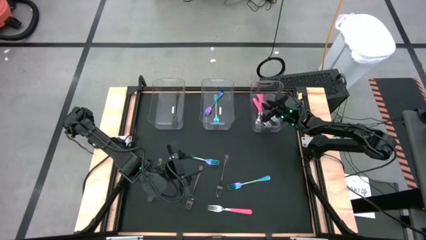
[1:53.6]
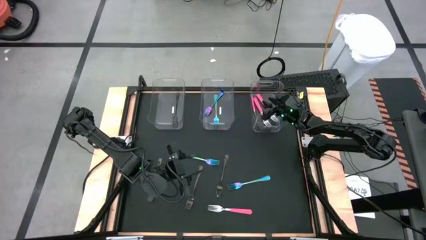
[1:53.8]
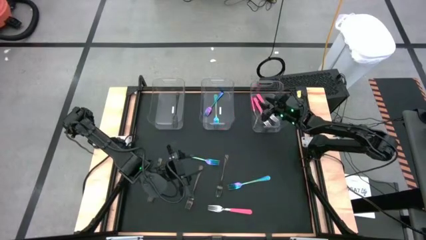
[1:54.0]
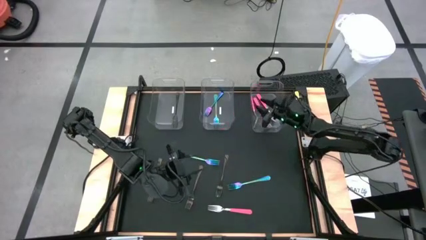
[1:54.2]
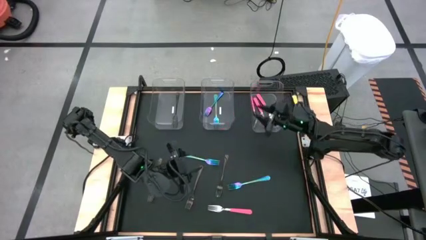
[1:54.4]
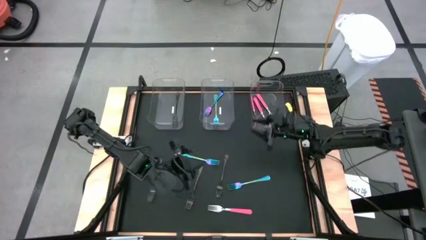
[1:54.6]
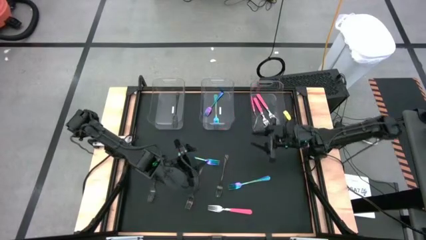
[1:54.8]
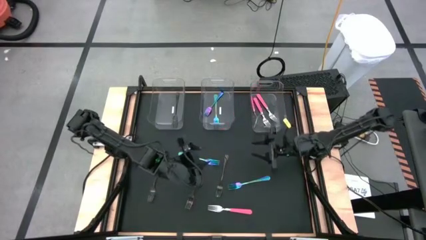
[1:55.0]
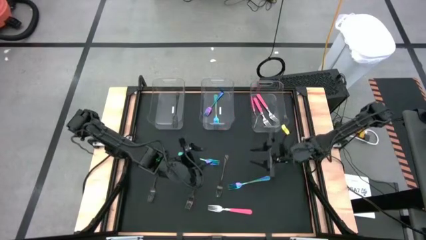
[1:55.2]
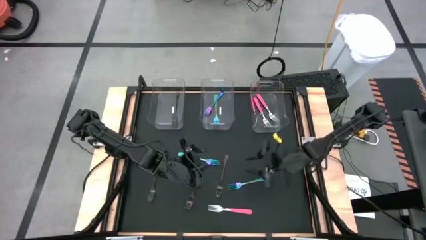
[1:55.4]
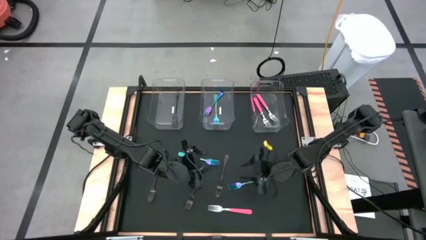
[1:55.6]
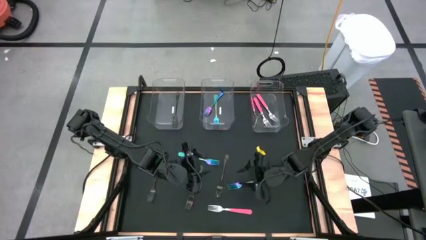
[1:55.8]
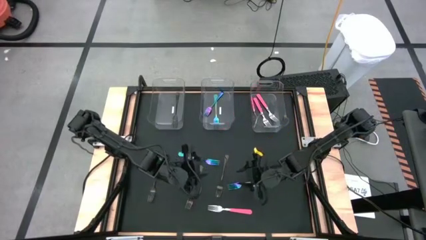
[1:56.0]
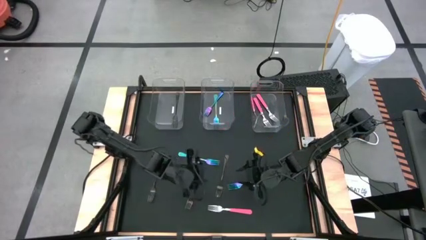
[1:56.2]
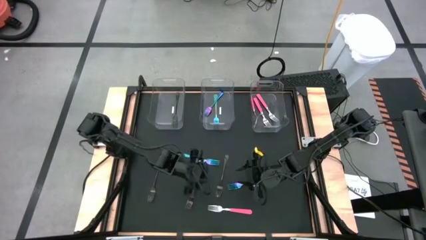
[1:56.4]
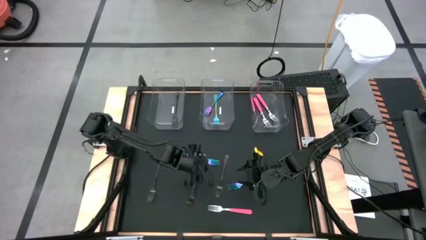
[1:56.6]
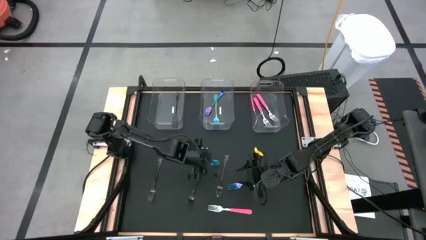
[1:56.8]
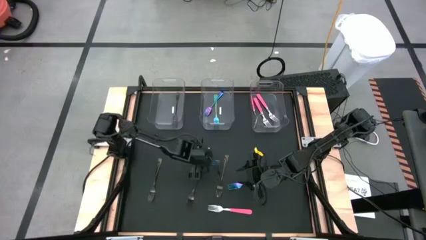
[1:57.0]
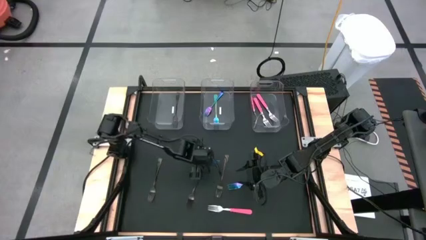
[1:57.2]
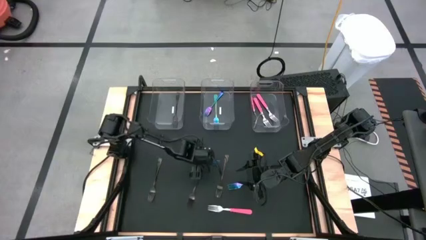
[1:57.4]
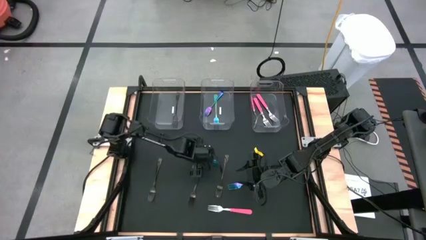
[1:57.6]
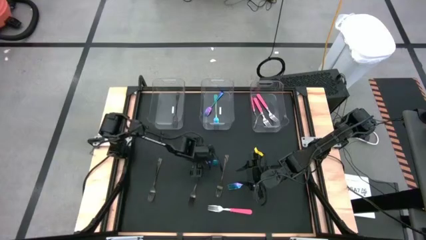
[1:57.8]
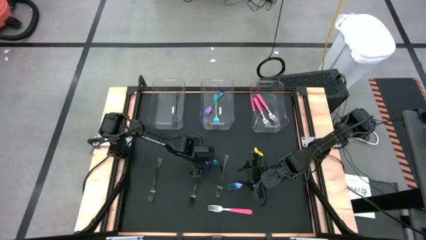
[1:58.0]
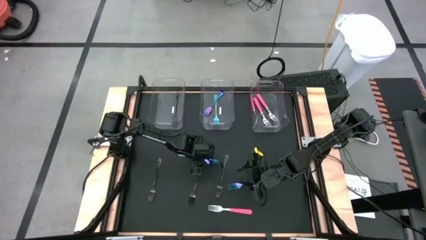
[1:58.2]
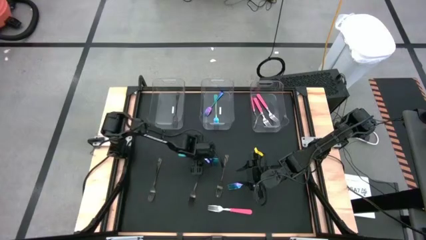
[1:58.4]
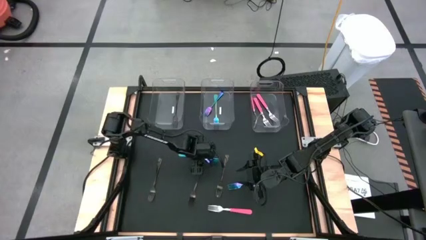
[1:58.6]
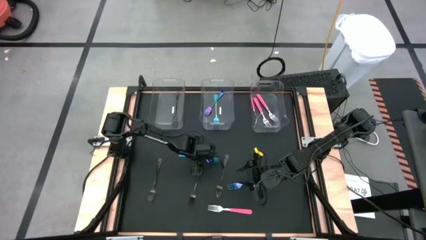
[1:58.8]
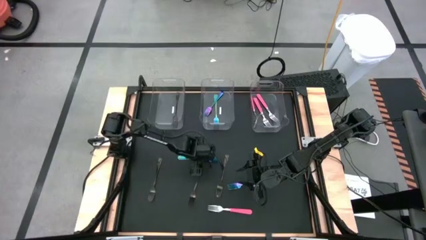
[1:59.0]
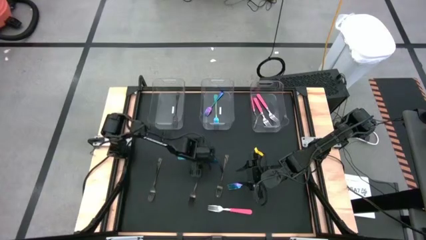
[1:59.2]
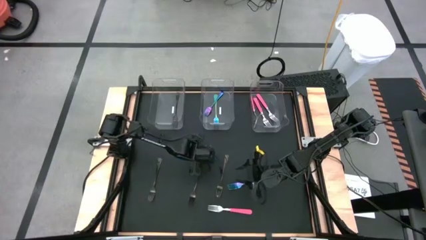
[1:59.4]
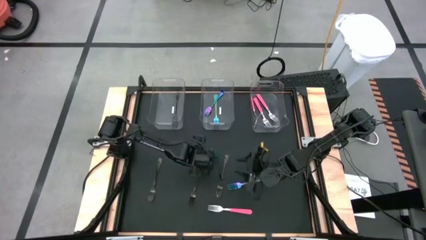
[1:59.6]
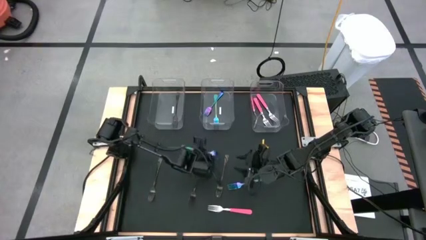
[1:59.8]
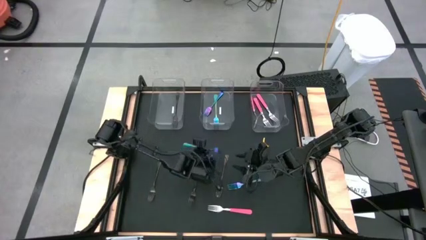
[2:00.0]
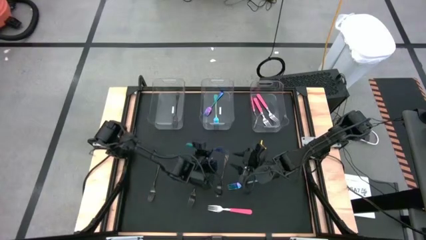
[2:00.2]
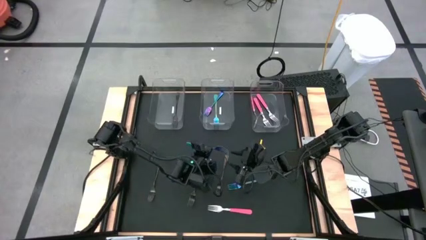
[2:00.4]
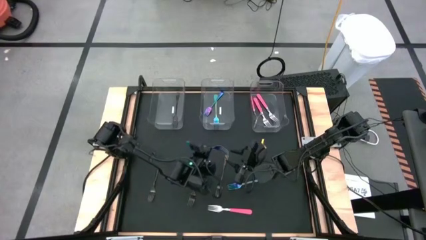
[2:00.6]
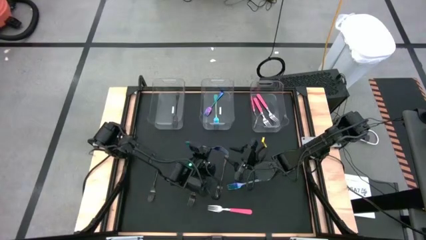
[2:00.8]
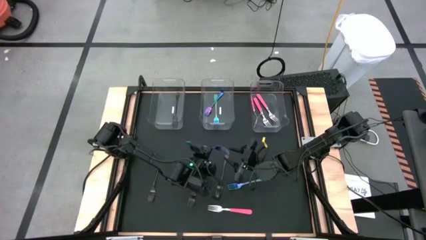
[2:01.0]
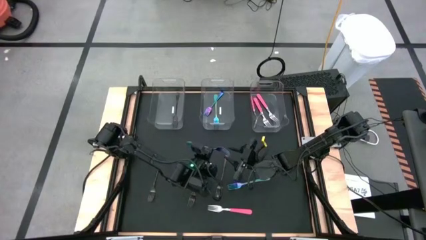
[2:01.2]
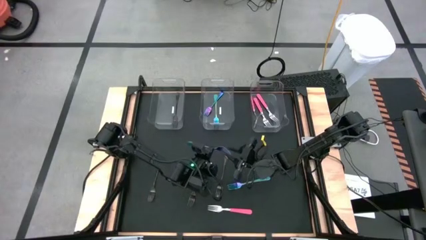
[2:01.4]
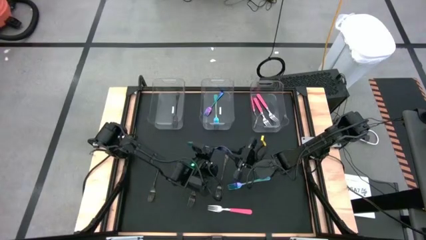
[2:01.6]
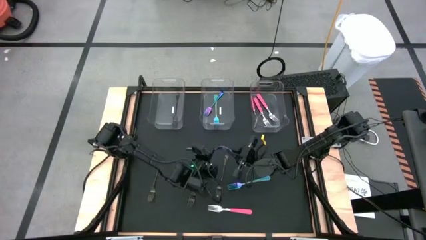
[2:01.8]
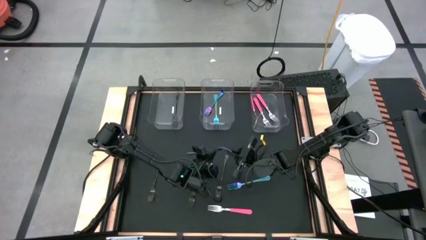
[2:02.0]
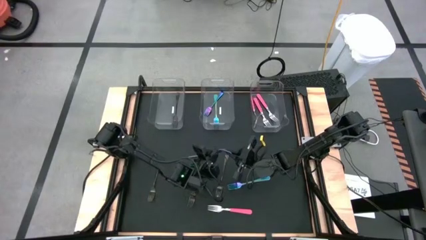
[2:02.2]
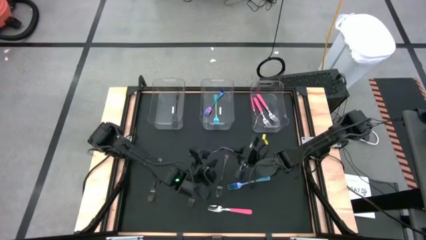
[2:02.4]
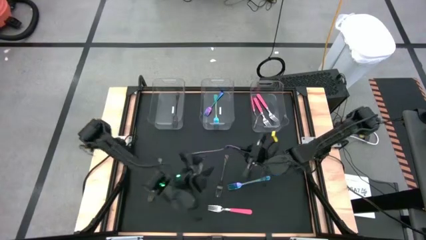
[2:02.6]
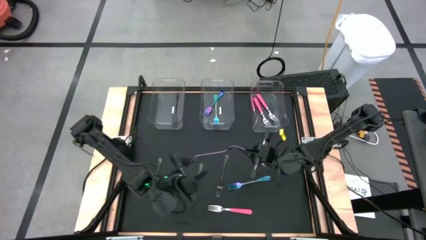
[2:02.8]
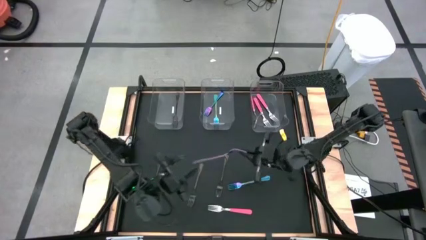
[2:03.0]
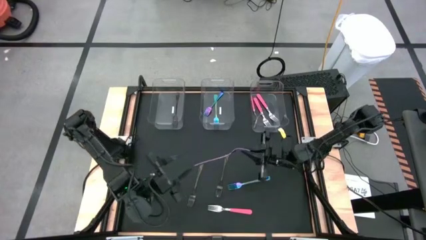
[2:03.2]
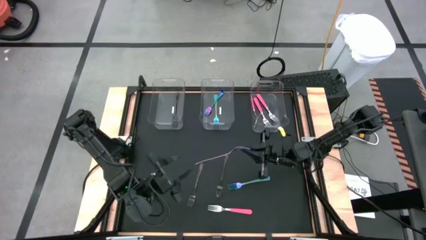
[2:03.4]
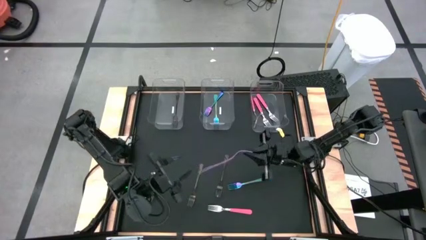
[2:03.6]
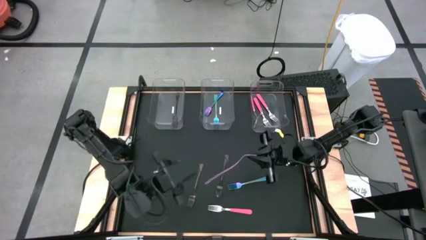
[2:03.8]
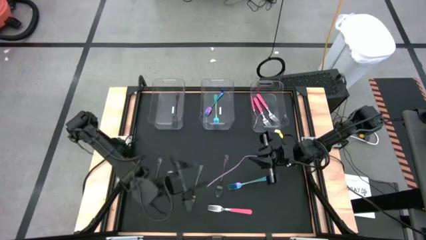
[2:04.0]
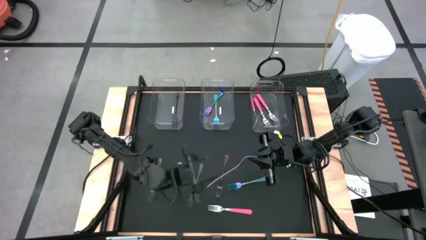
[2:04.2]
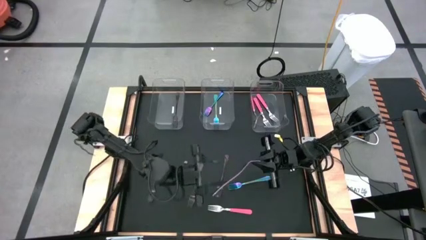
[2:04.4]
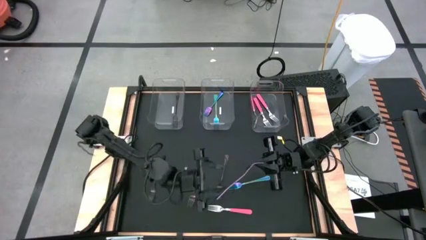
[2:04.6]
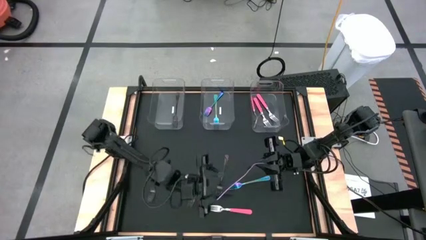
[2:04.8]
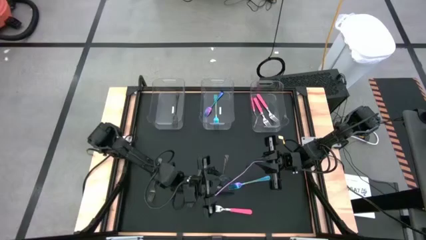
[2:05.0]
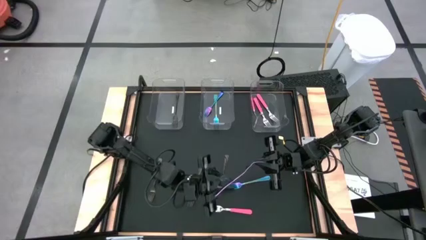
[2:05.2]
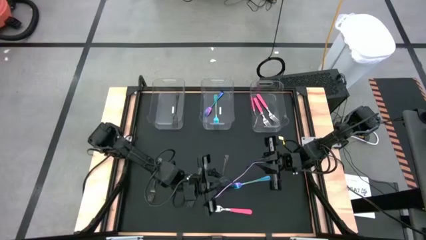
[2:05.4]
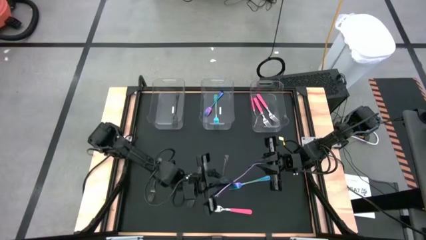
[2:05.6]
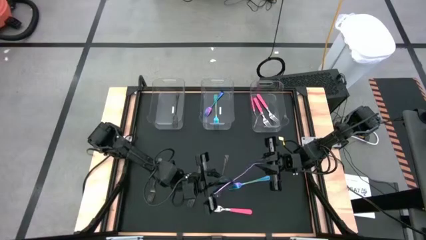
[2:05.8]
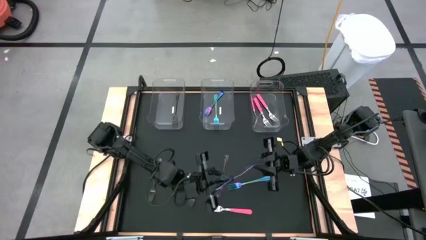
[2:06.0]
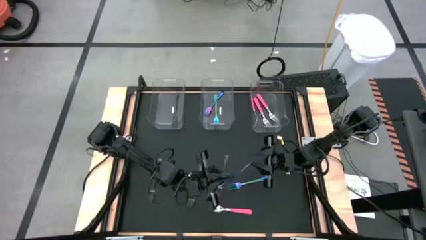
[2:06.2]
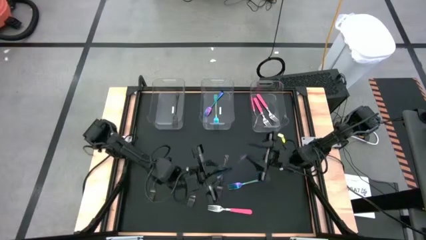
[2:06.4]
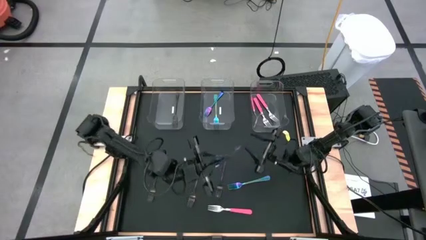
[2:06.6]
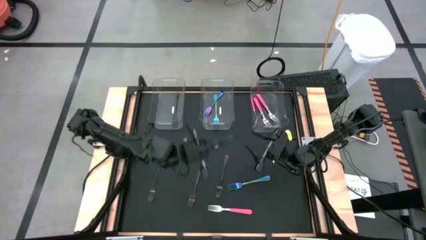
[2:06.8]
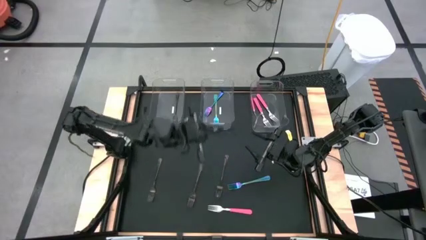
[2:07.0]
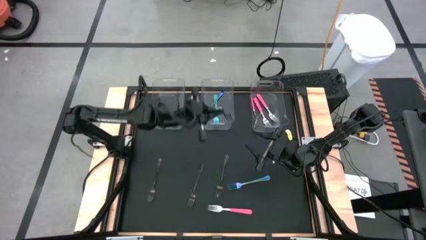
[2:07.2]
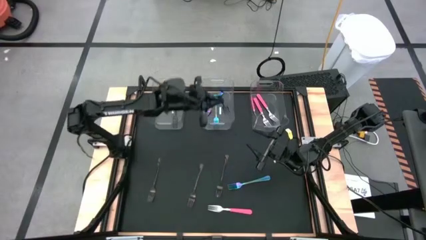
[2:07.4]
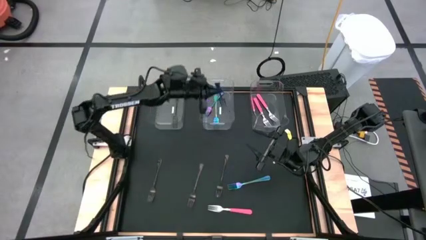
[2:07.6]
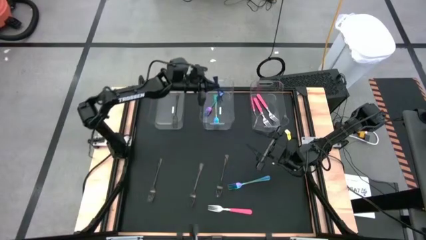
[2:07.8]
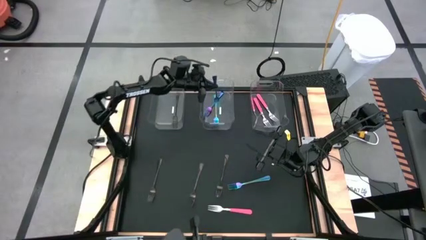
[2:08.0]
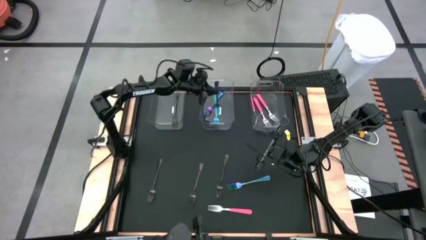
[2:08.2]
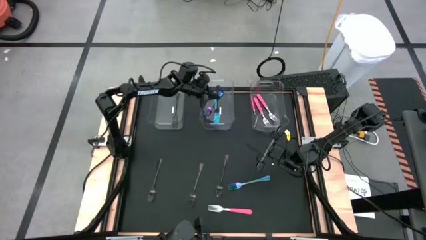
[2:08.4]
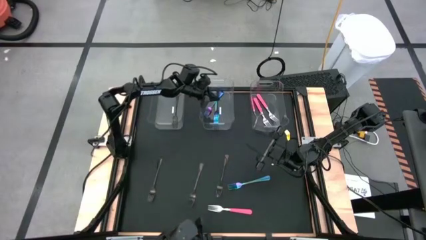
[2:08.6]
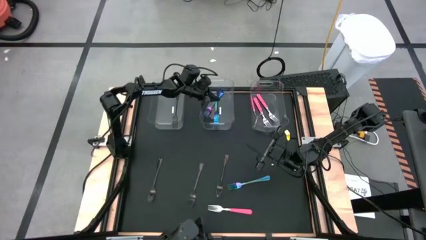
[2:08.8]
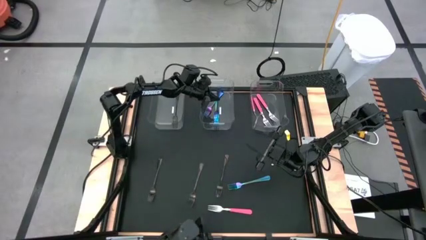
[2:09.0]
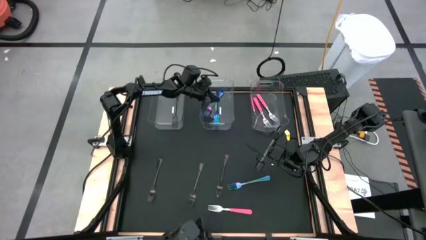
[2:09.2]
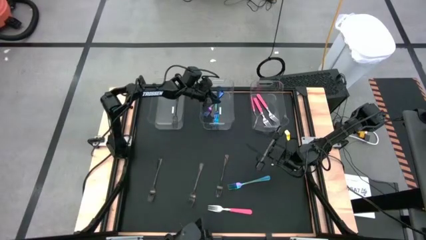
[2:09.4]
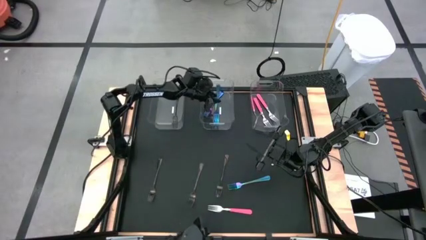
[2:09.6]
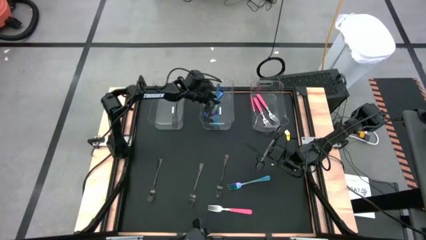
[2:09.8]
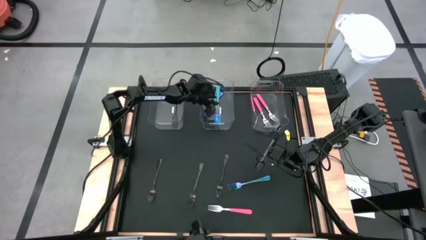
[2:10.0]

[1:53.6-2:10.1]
Task: Sort silverware by color (type)
Put the blue fork into the middle transparent bin
